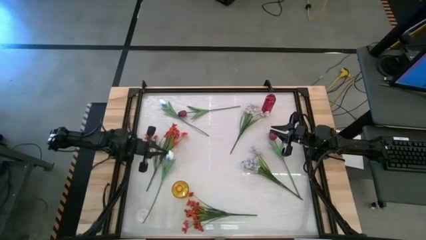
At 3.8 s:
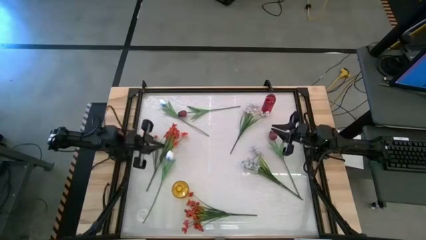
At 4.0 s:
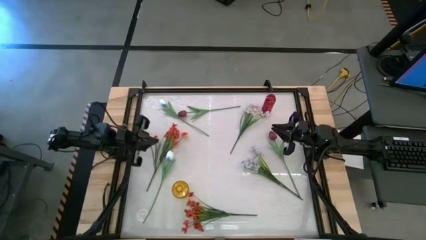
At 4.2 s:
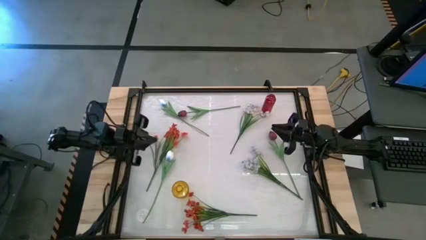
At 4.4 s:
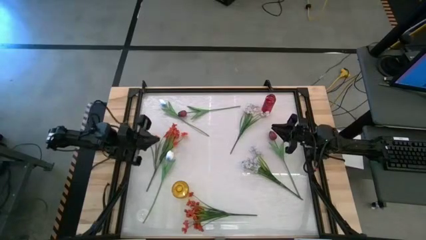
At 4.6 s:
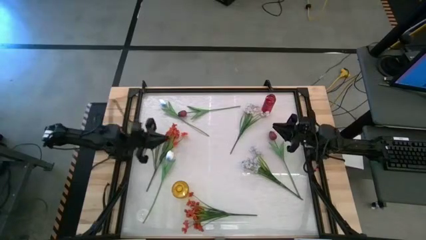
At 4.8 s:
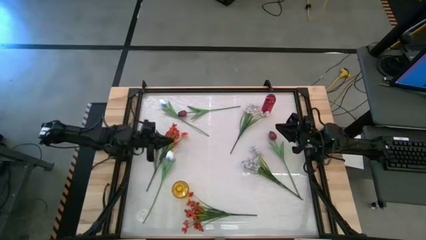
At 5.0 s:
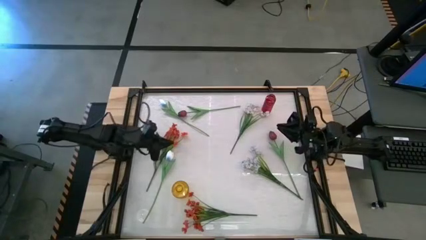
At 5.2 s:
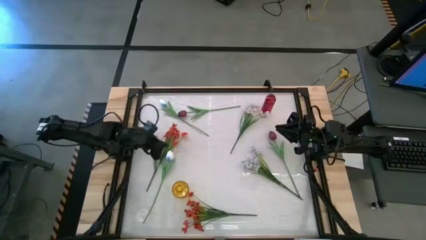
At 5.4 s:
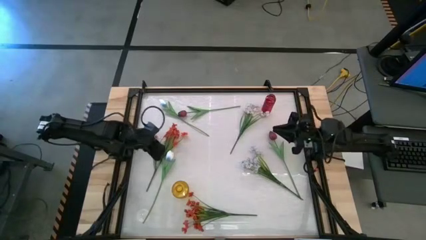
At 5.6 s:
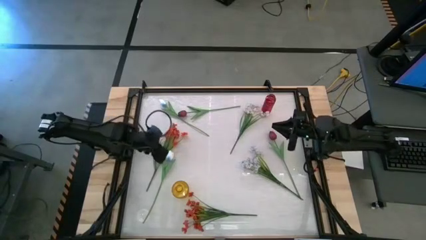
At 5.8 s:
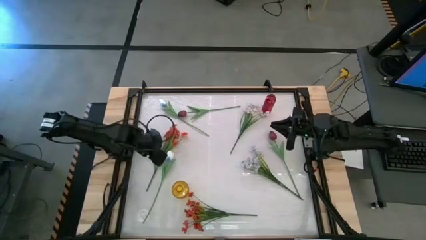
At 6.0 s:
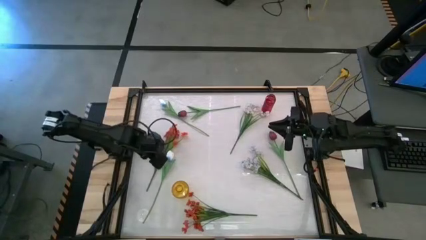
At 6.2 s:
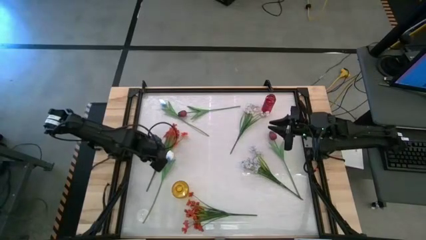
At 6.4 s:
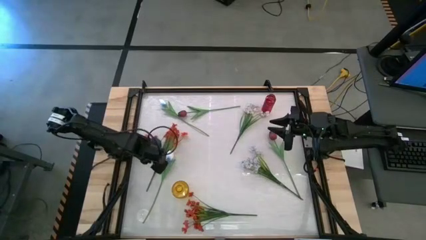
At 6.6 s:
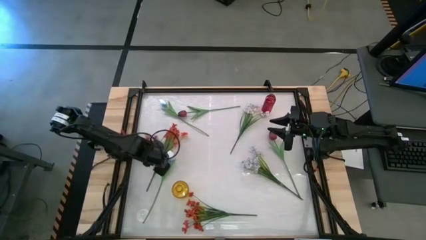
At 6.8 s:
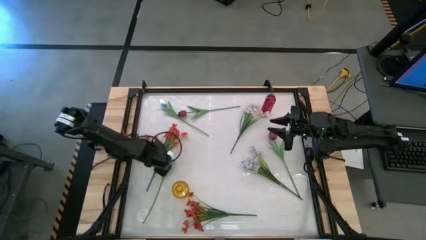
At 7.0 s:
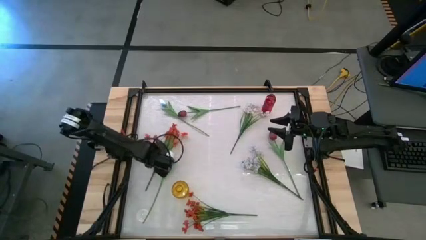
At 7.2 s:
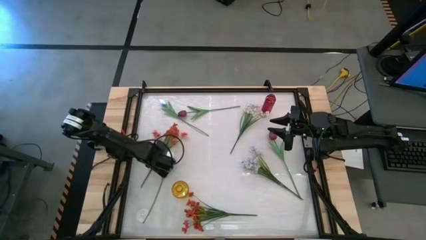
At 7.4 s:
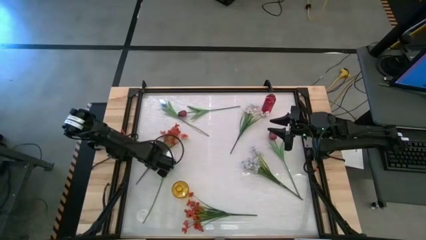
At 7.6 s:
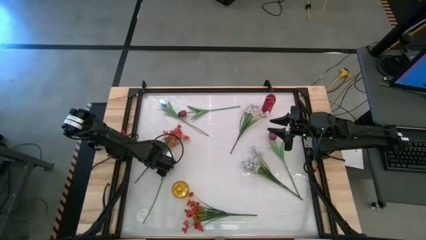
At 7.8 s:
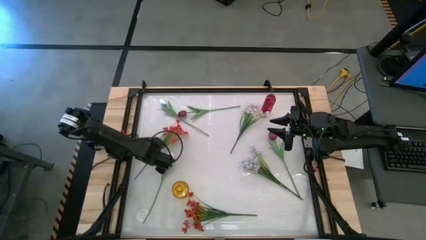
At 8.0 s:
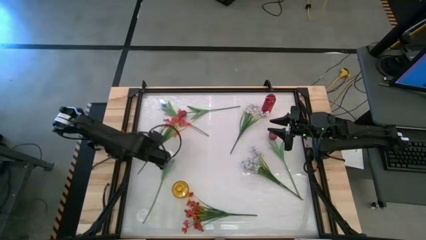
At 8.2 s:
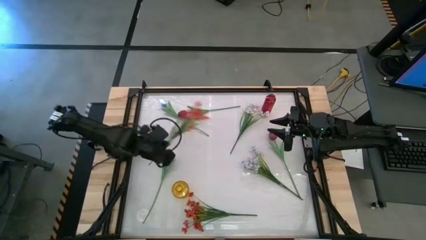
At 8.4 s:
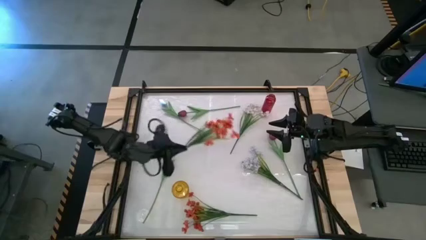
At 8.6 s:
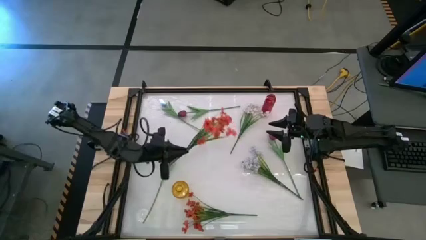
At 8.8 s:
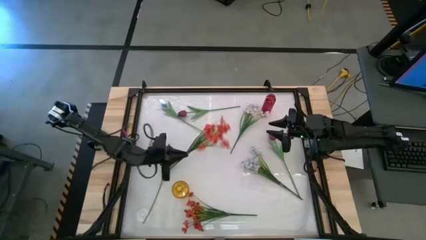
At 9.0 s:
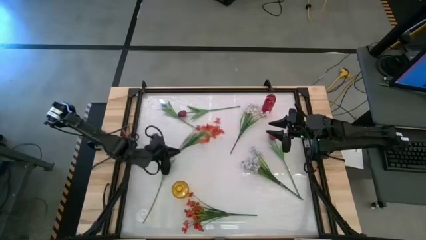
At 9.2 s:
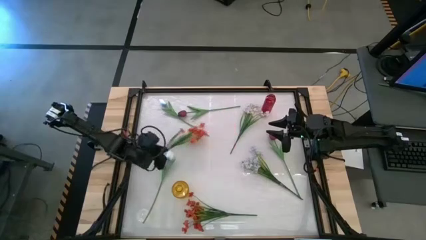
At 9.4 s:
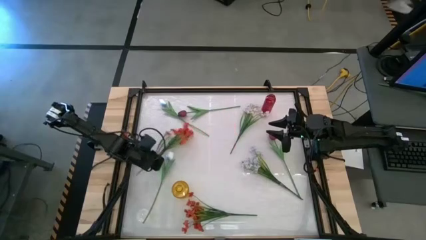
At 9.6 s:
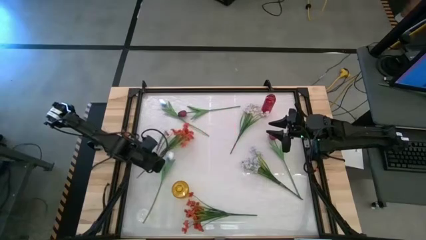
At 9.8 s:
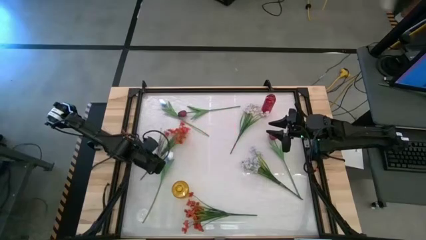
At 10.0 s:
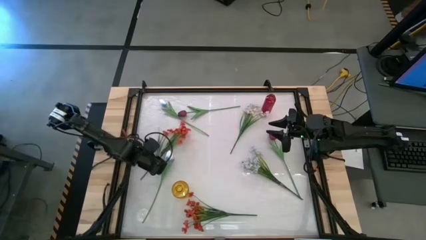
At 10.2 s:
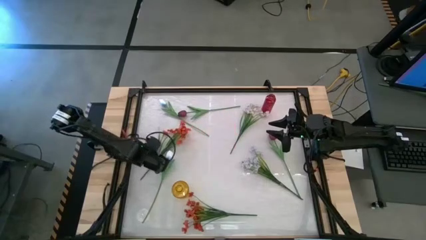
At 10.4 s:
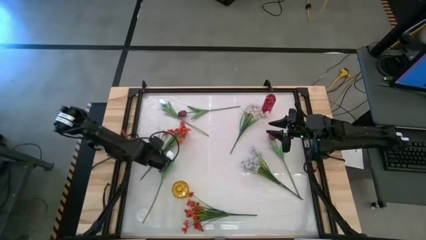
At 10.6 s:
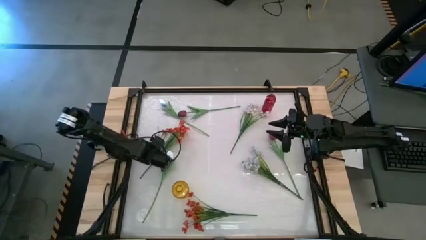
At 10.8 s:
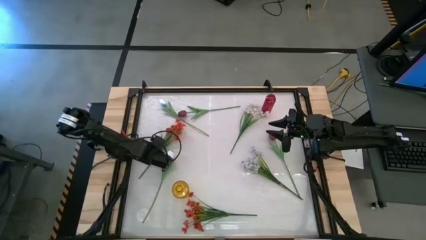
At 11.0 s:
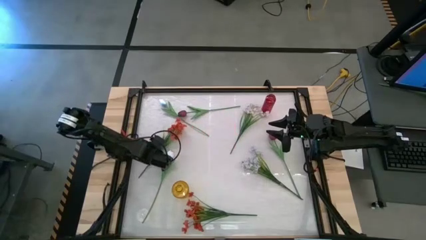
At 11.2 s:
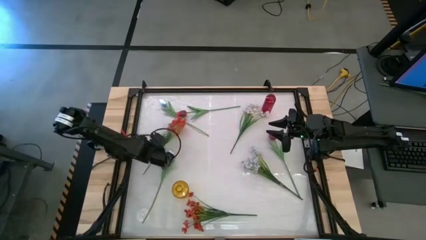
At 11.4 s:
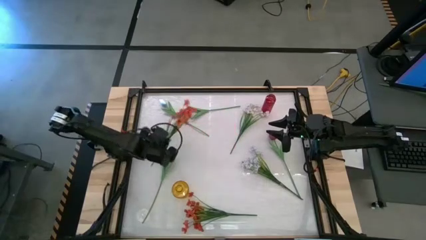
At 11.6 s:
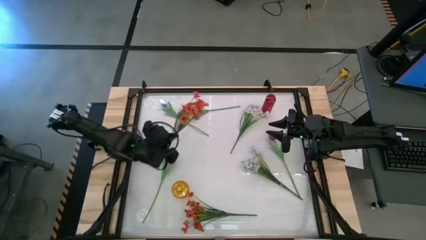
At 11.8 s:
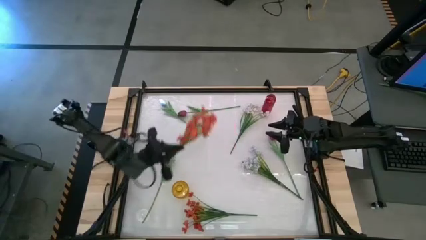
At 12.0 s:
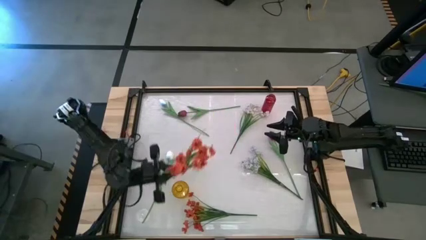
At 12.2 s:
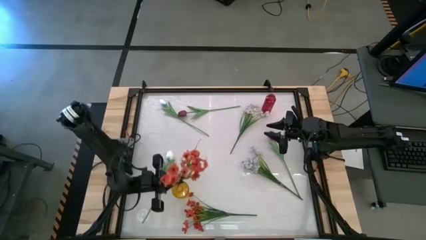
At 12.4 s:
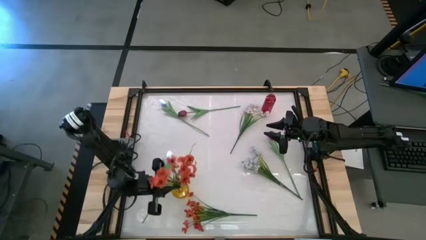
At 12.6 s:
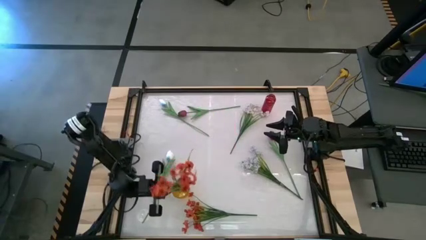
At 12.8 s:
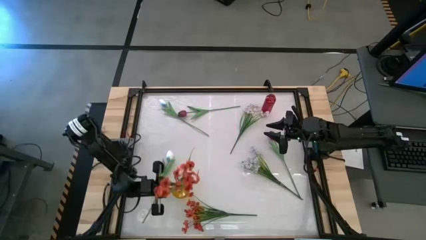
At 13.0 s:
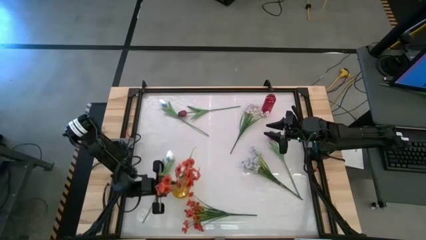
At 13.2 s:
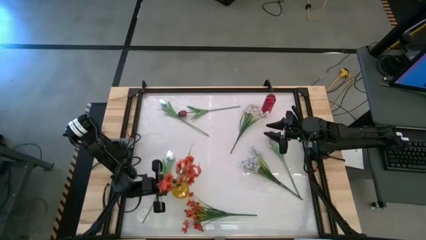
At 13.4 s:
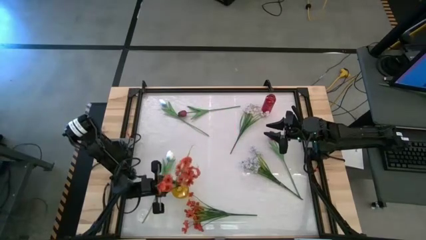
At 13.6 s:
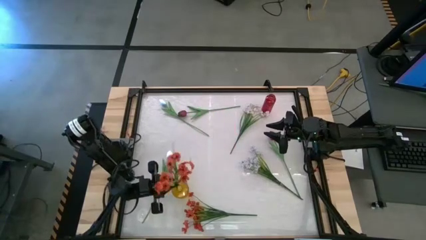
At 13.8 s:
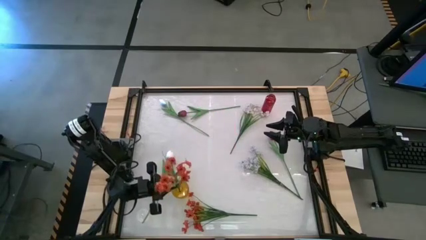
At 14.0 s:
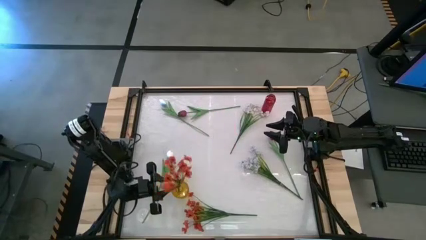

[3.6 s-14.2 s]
Task: Sort flowers into vase by color
Put the top orange flowers into the yellow vase
